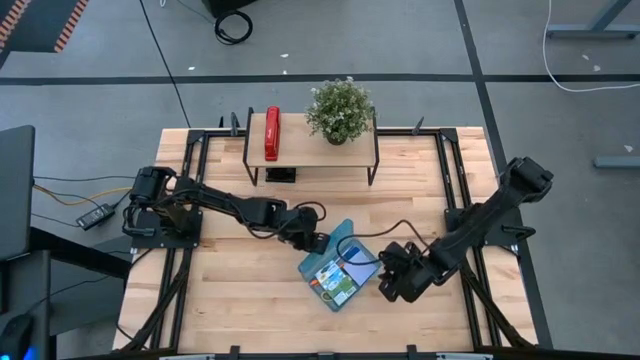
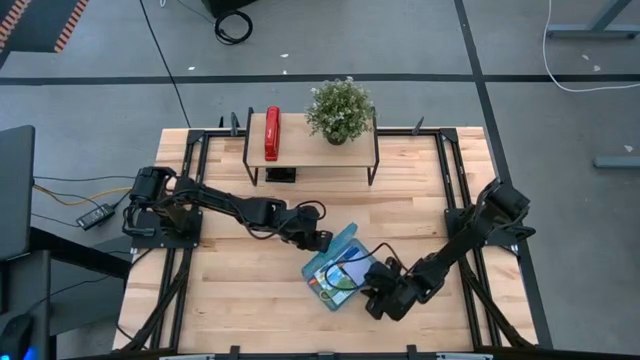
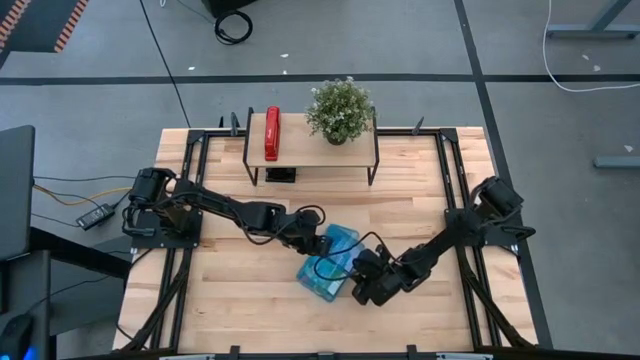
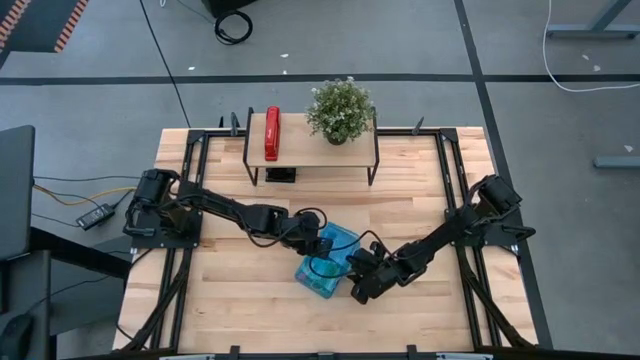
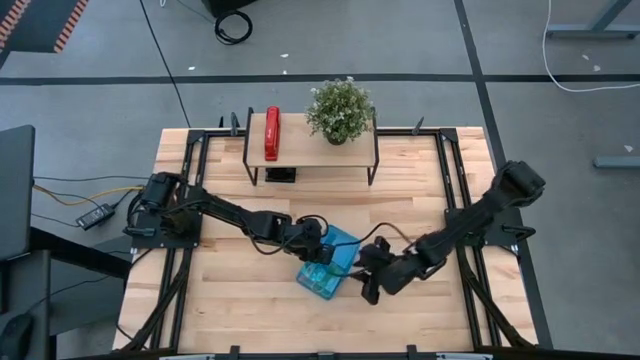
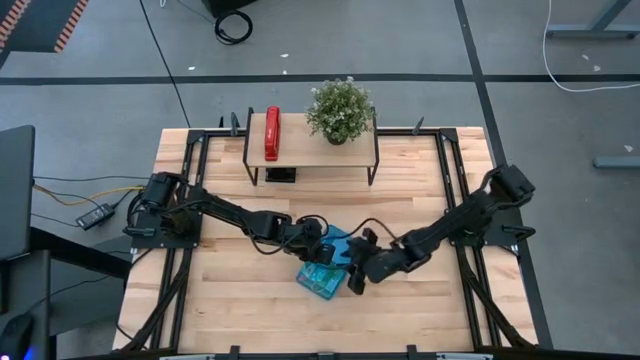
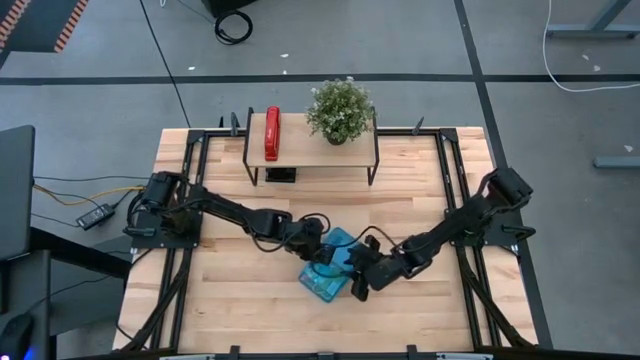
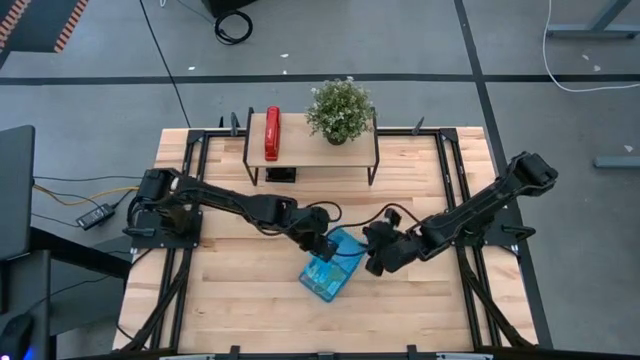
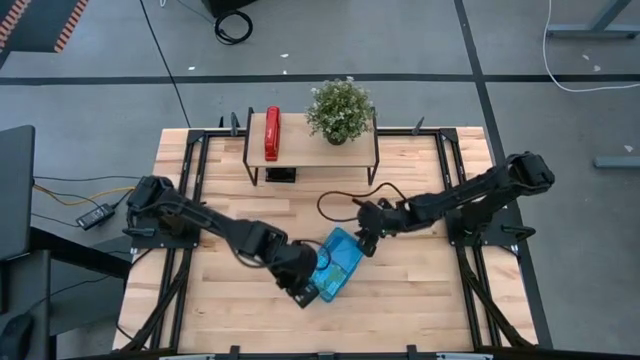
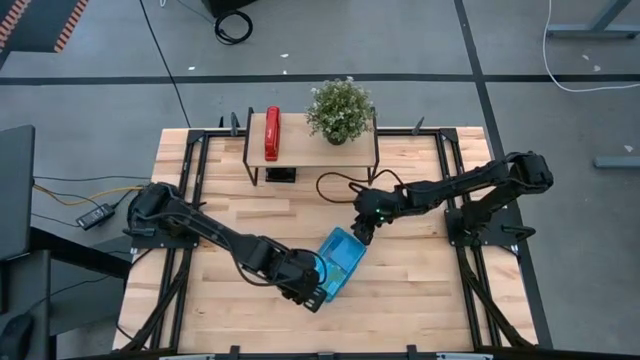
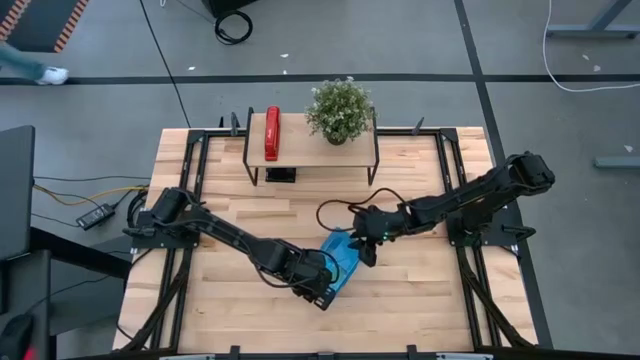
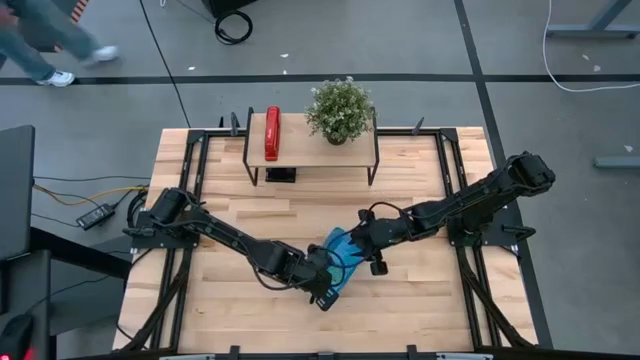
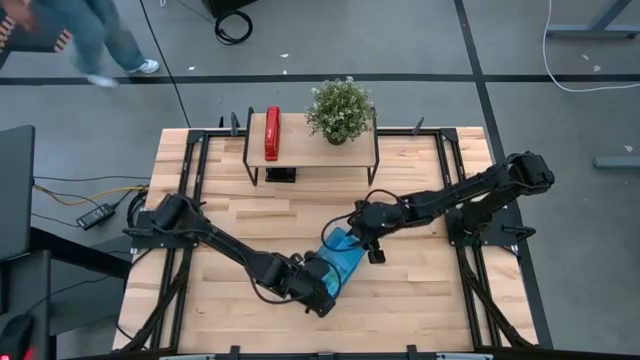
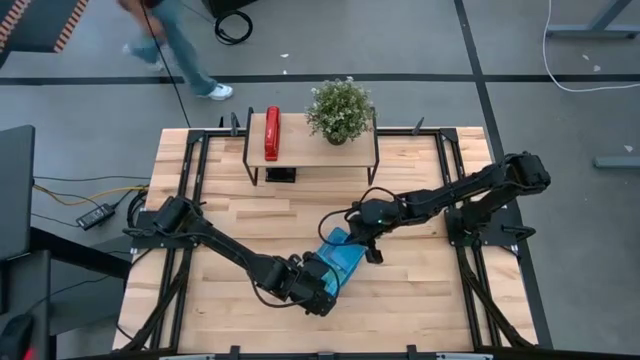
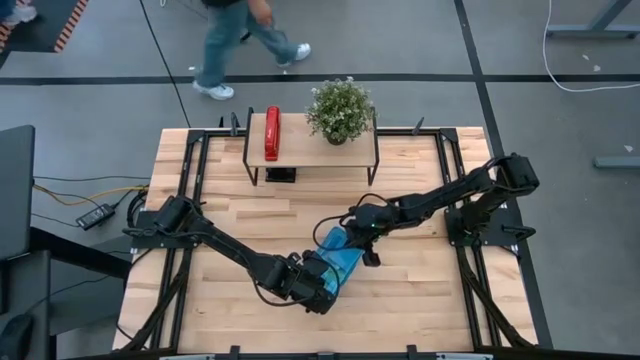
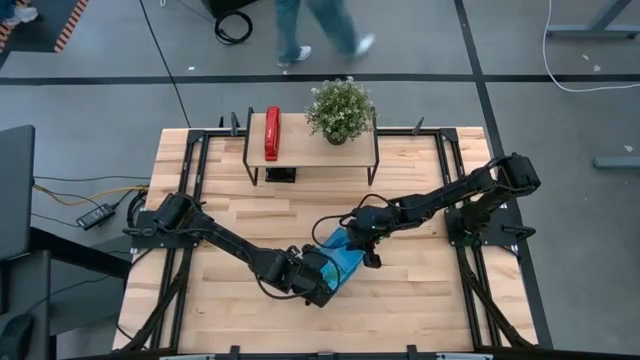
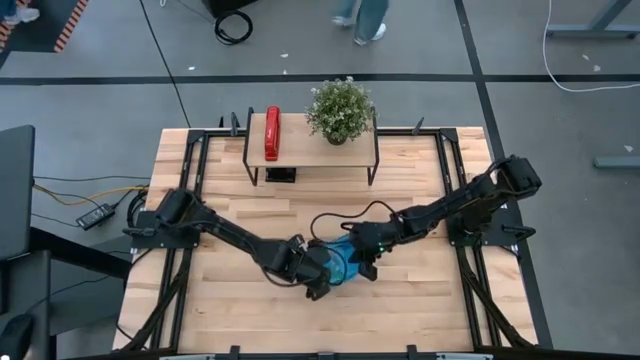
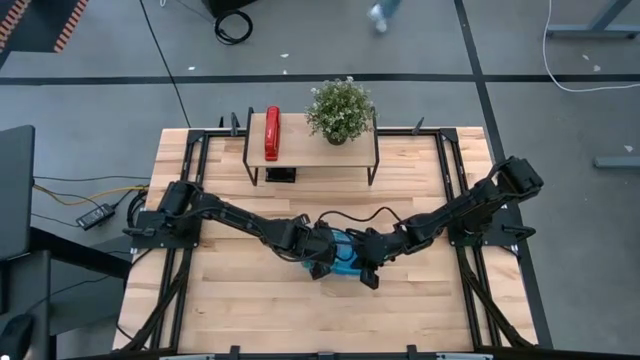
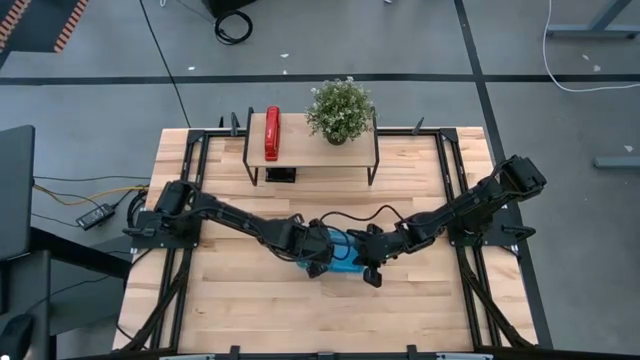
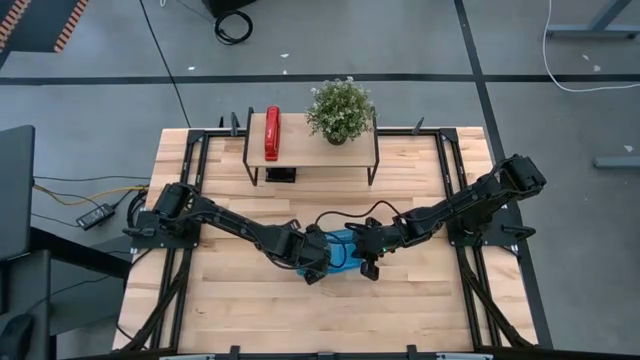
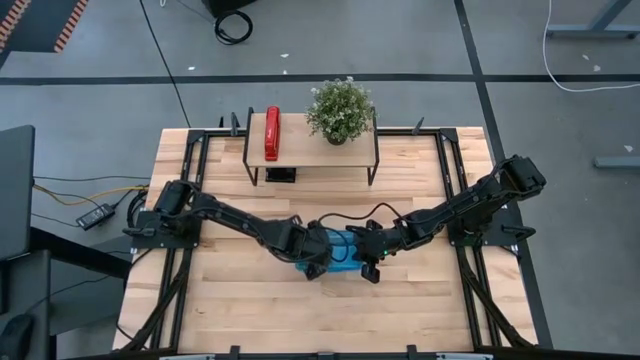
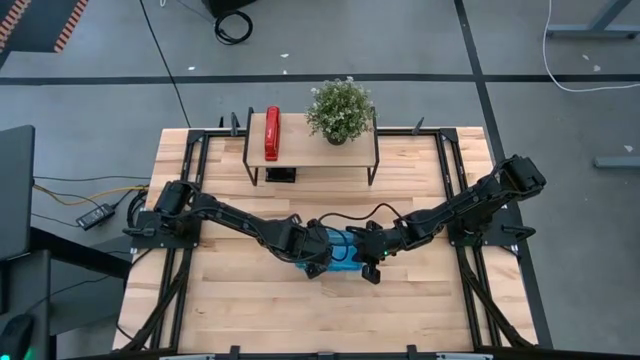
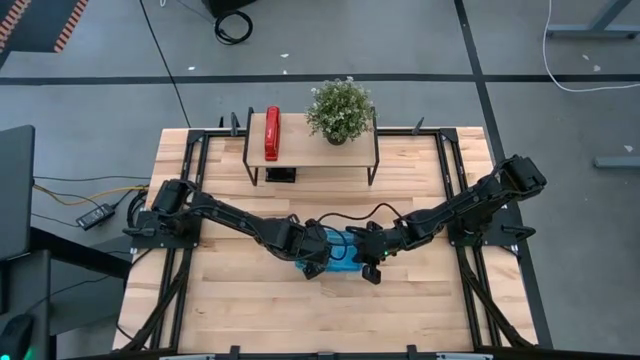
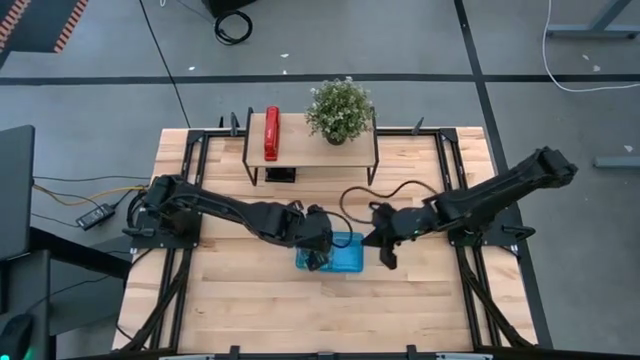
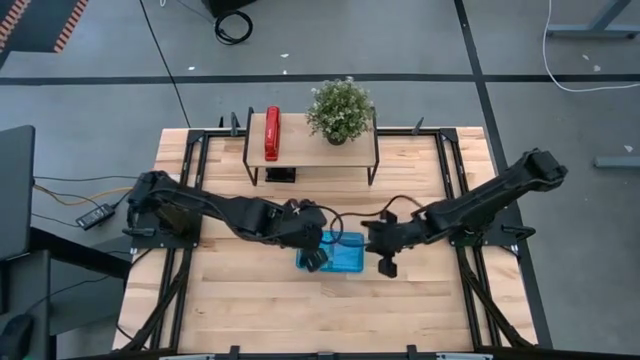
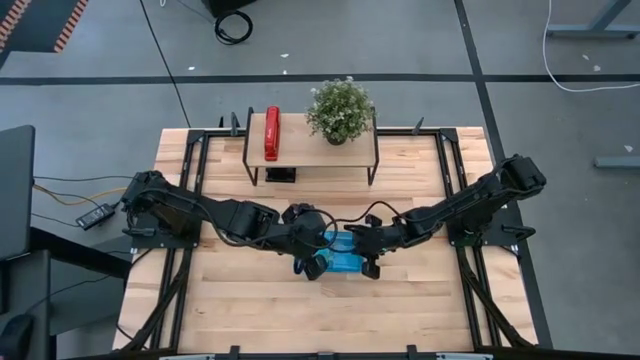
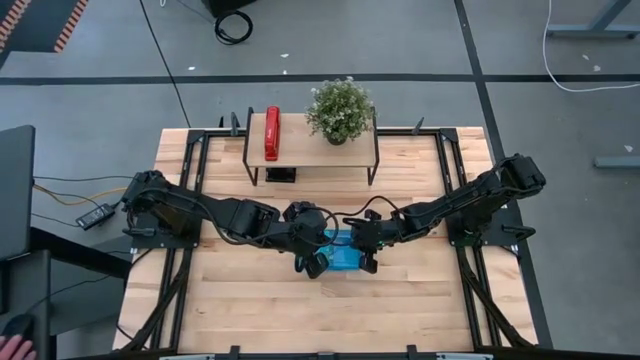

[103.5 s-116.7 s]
Task: Pack school essentials
Close the blue supply box

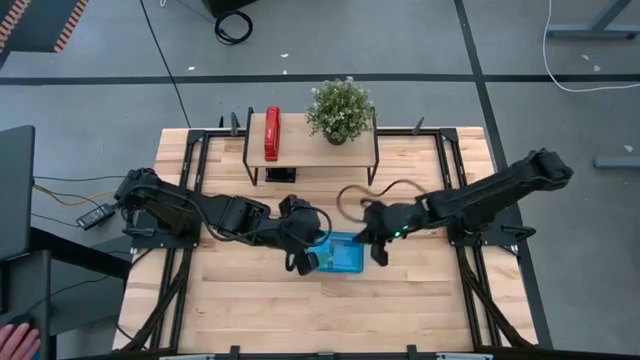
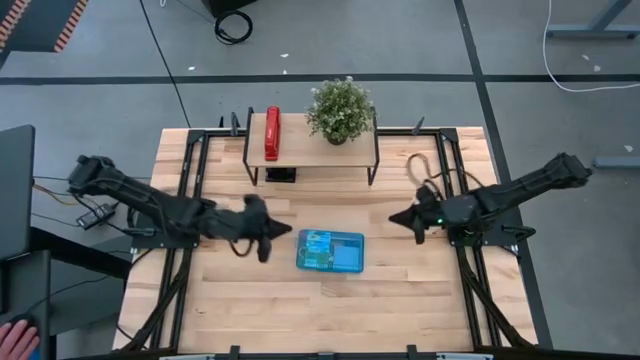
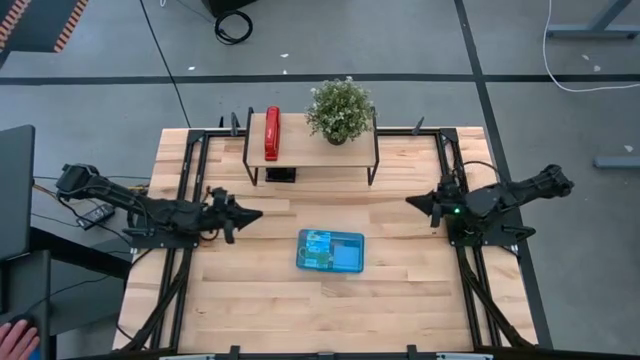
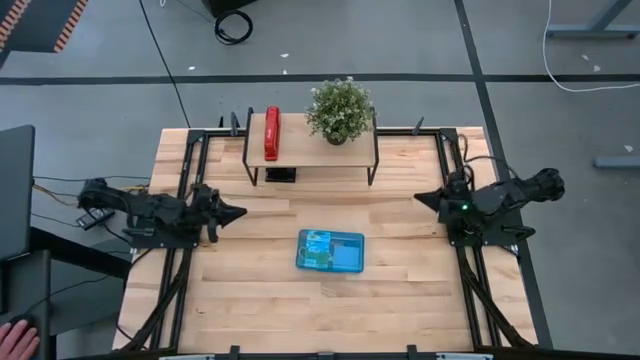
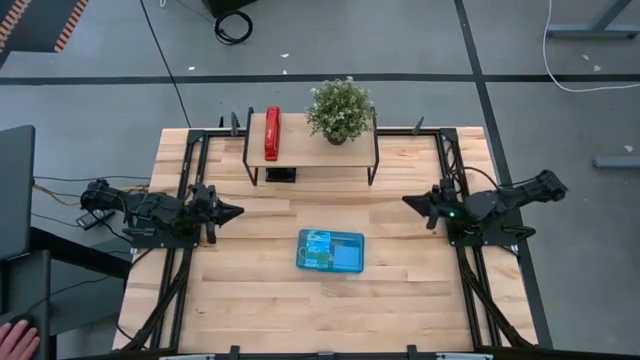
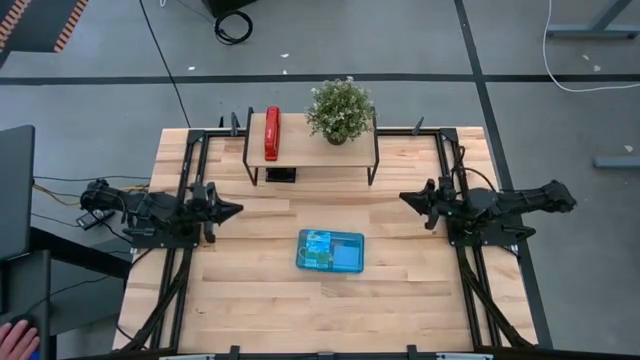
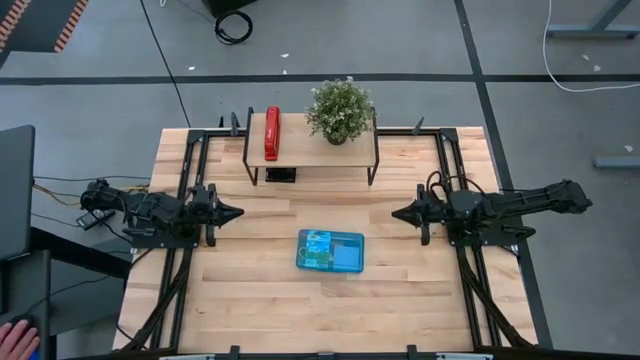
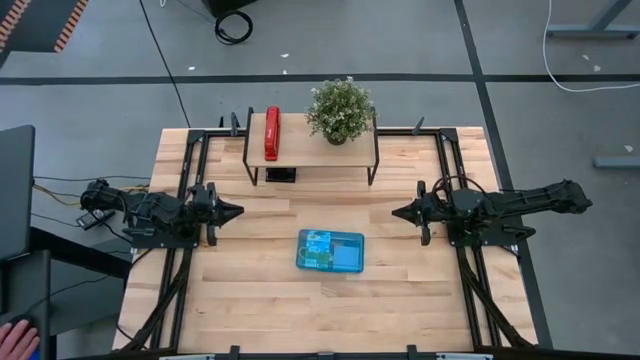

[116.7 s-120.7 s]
Return to Home Position

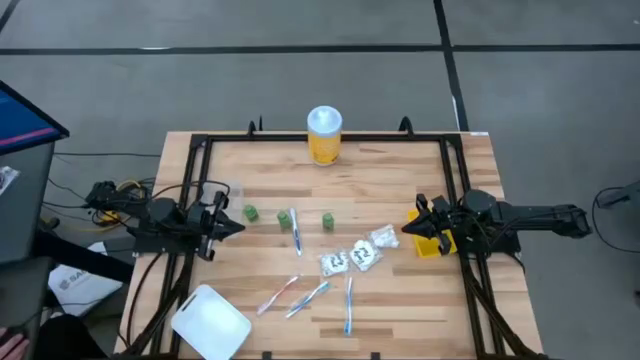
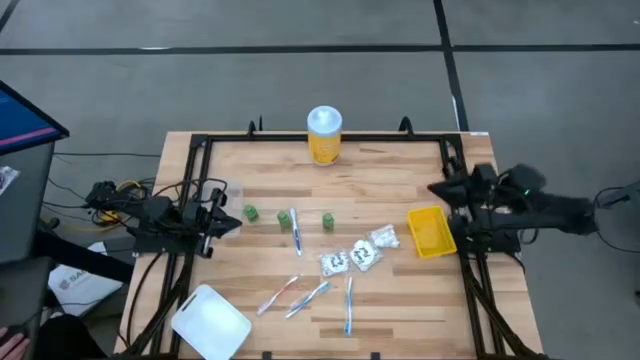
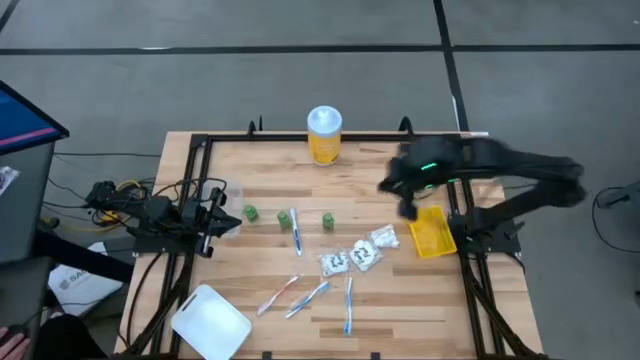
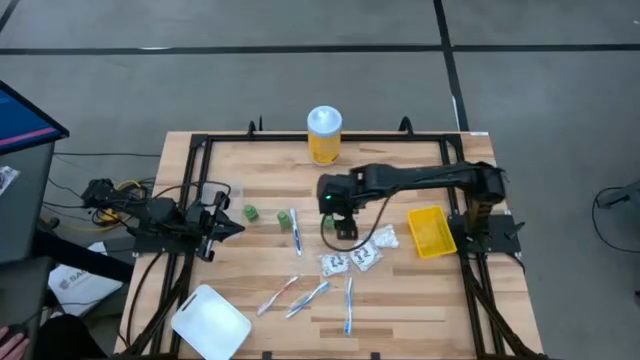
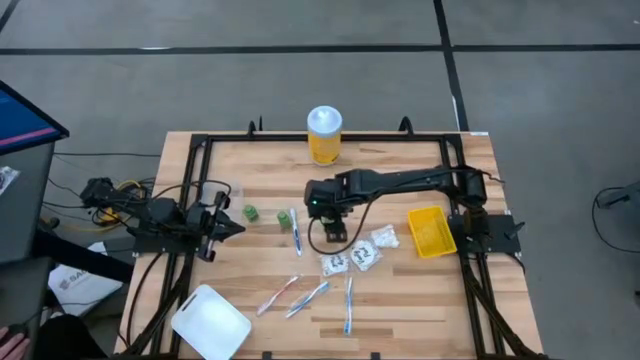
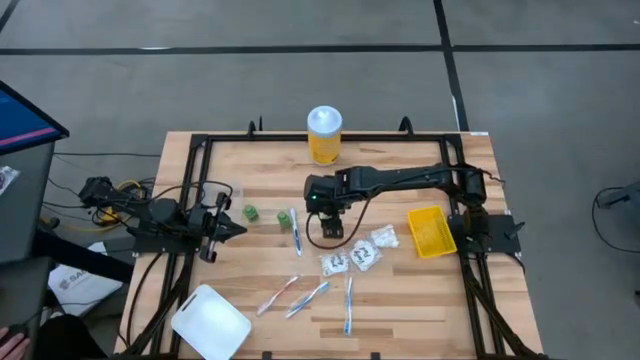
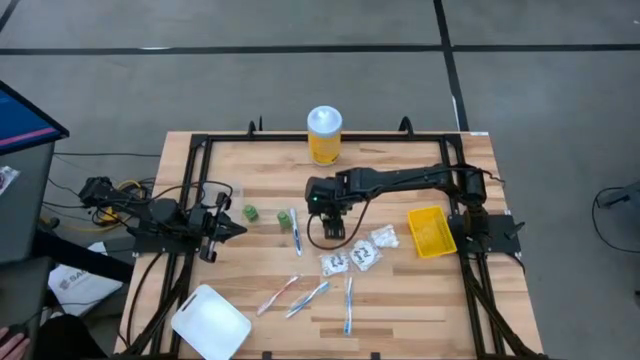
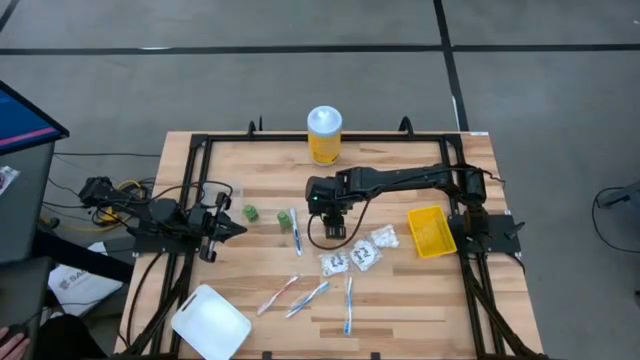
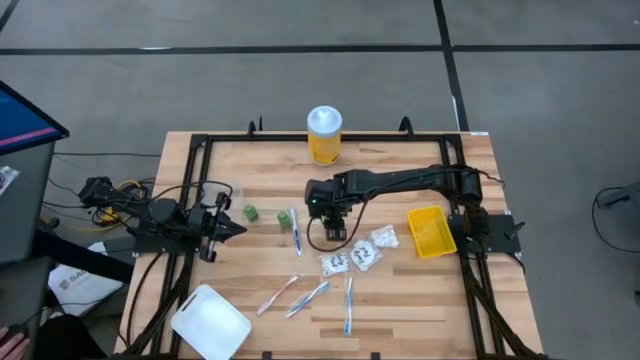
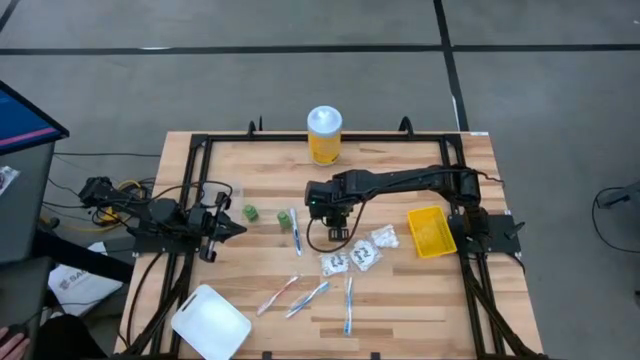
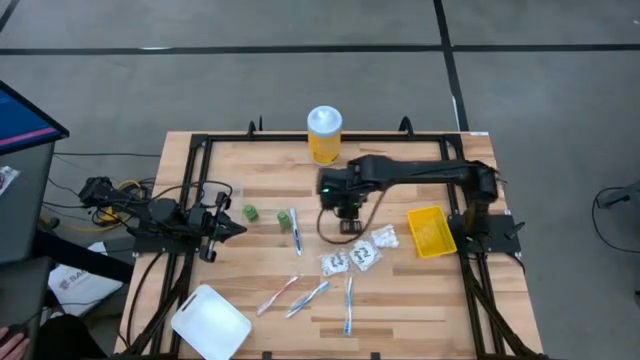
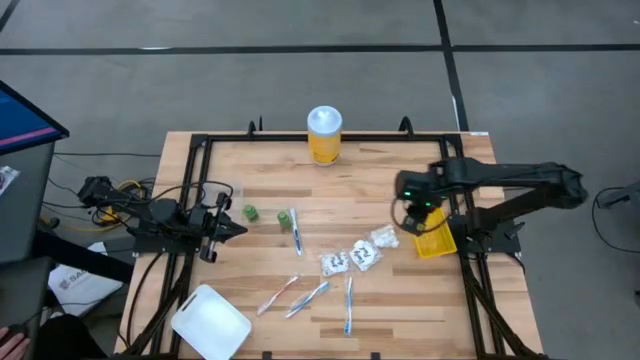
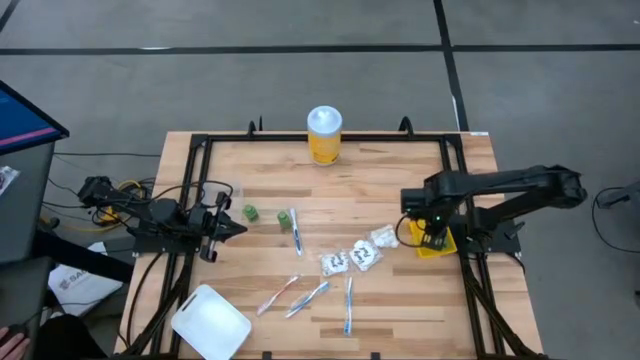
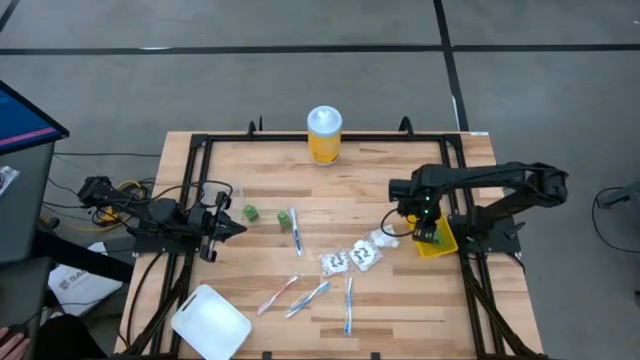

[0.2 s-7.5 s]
Task: Pick & Place Travel size toiletries
Put the right green shampoo into the yellow bin
